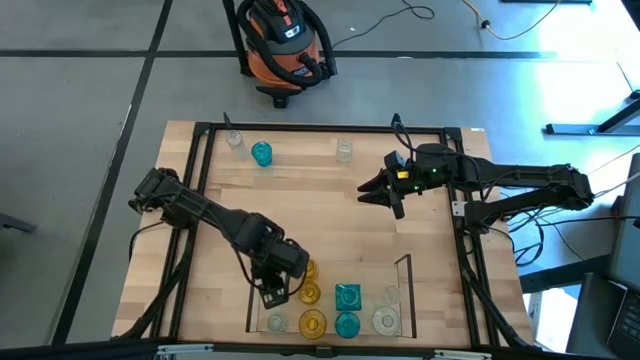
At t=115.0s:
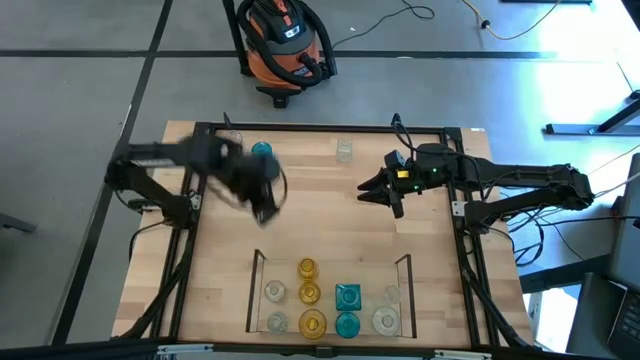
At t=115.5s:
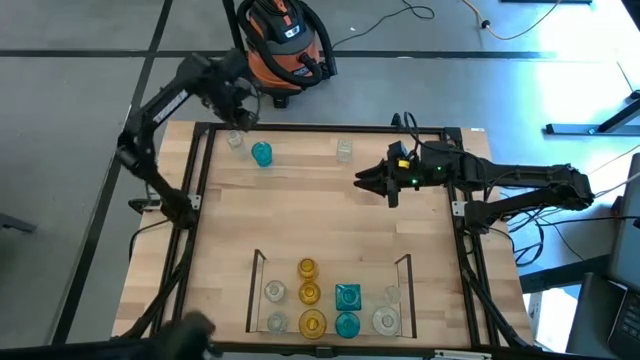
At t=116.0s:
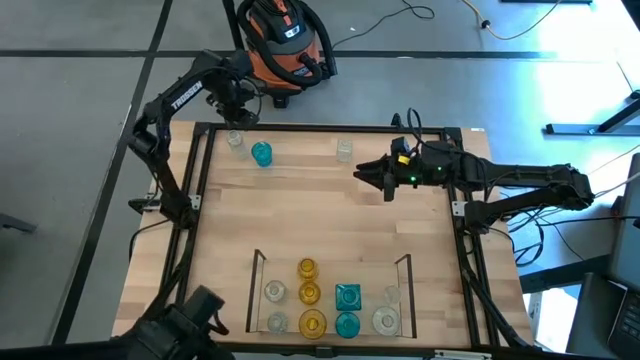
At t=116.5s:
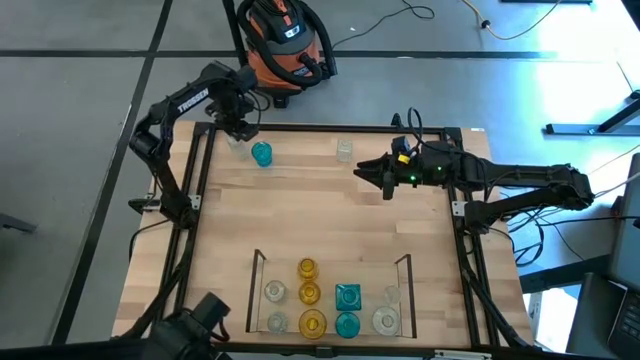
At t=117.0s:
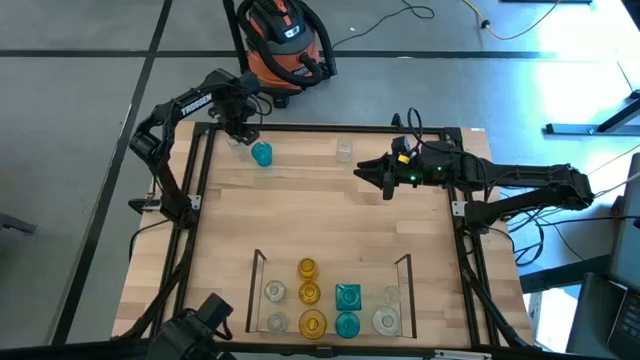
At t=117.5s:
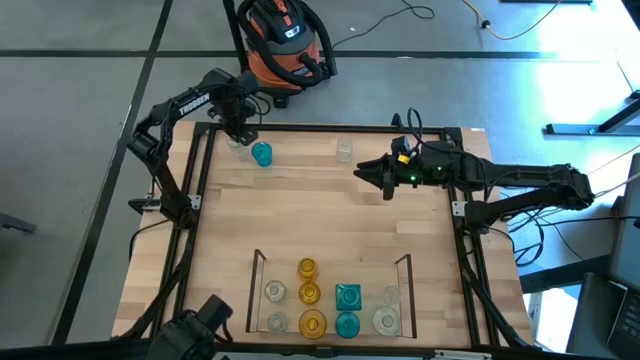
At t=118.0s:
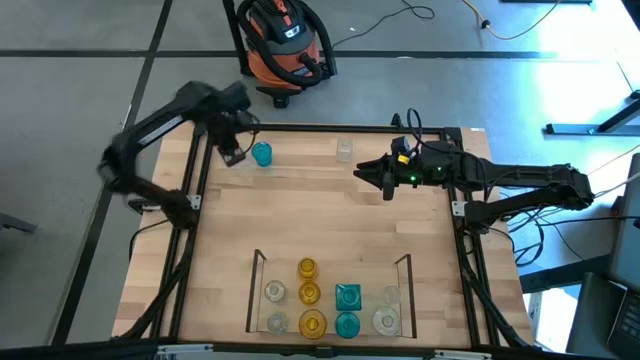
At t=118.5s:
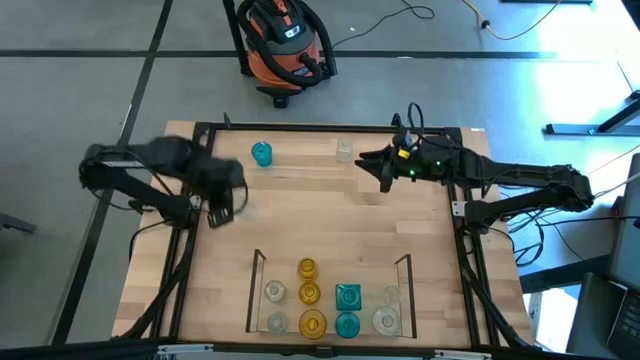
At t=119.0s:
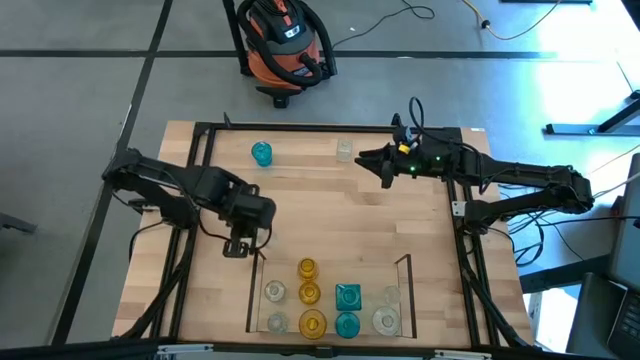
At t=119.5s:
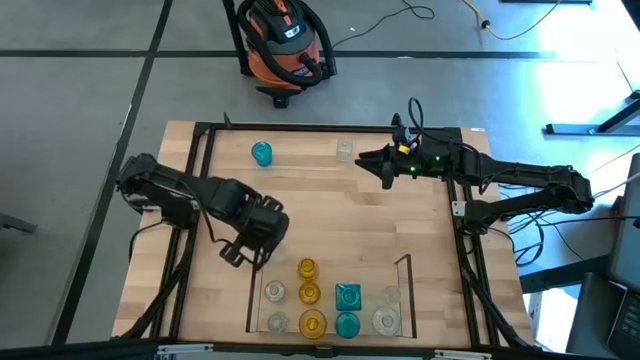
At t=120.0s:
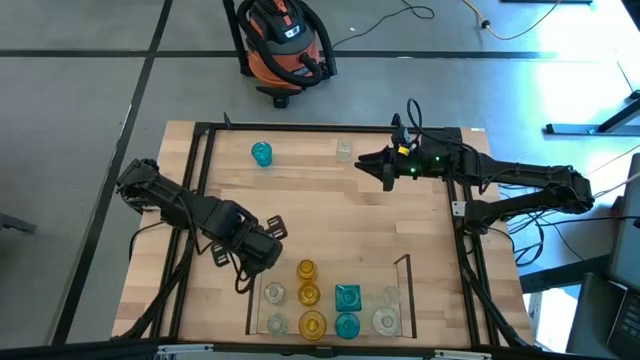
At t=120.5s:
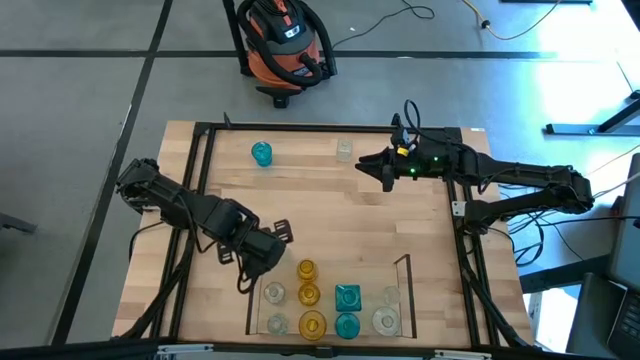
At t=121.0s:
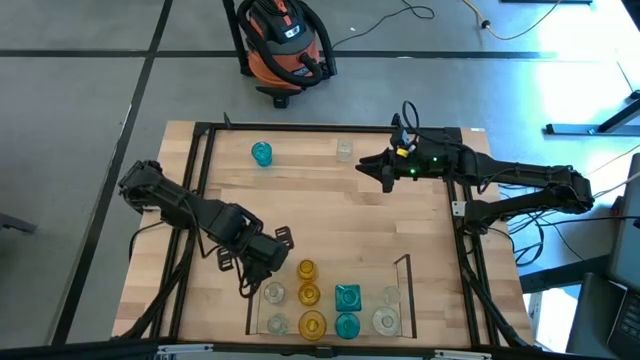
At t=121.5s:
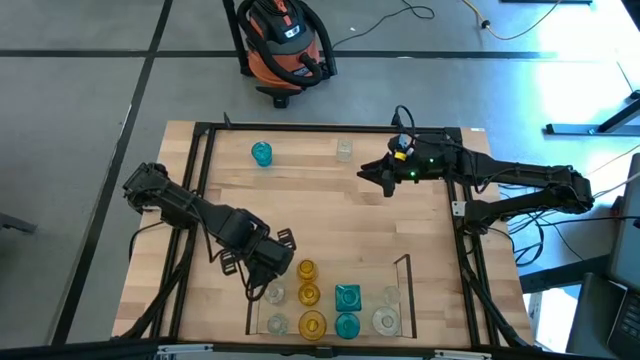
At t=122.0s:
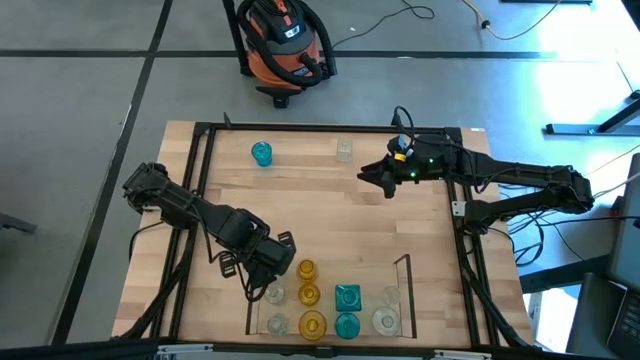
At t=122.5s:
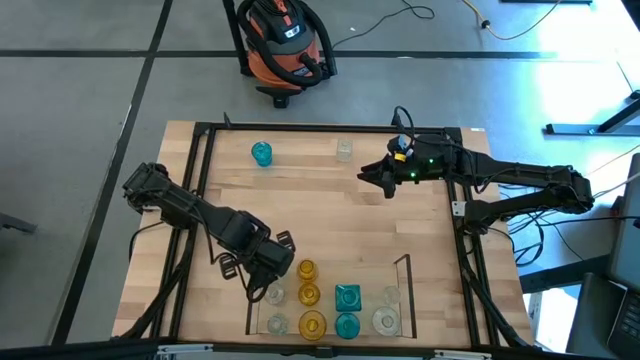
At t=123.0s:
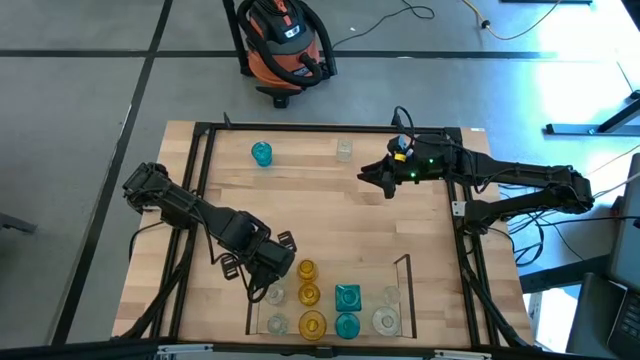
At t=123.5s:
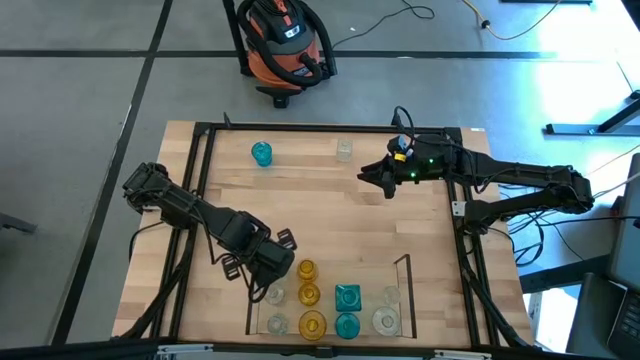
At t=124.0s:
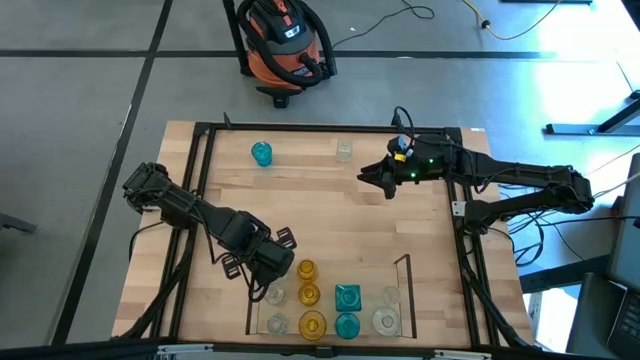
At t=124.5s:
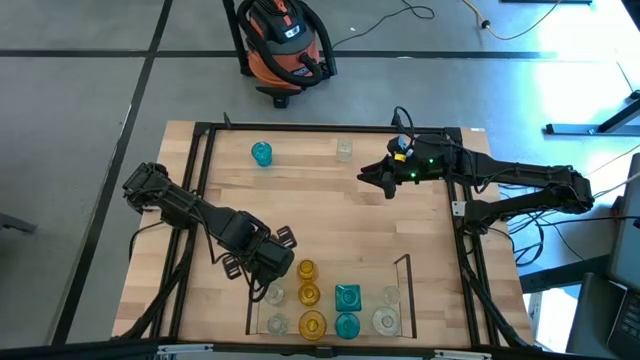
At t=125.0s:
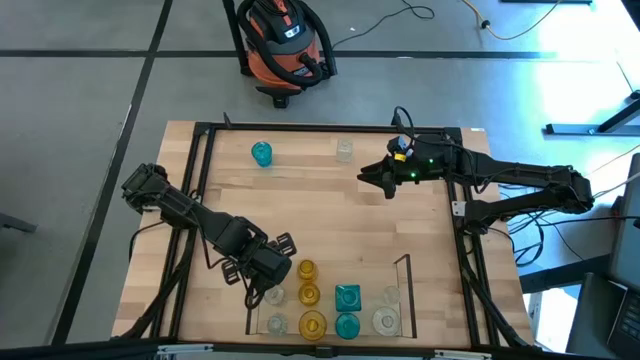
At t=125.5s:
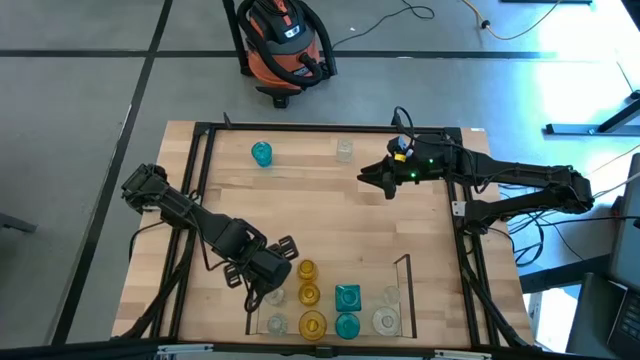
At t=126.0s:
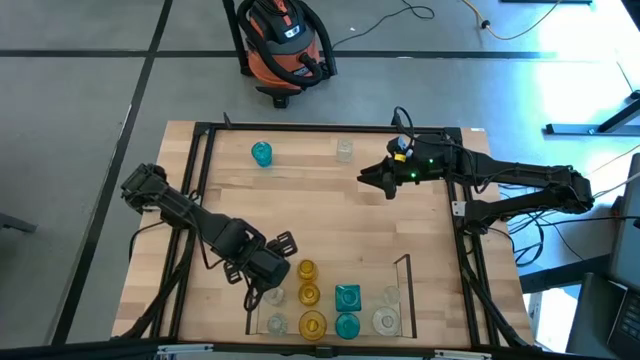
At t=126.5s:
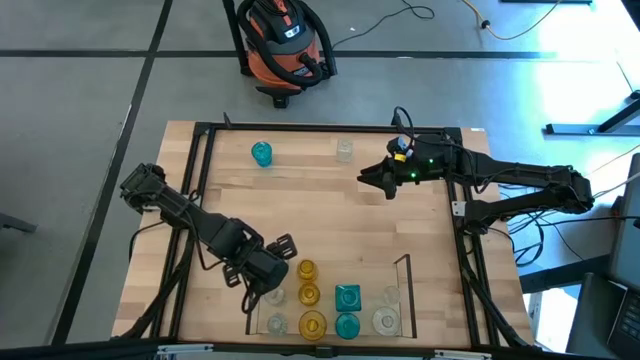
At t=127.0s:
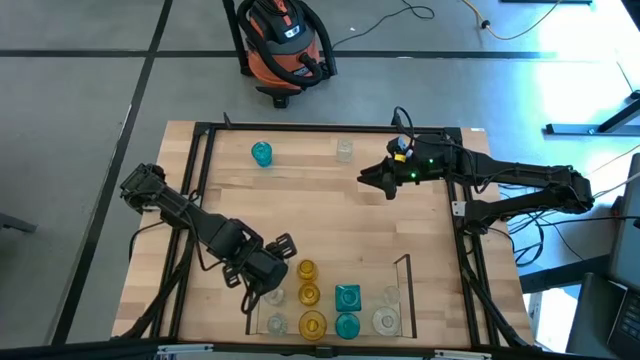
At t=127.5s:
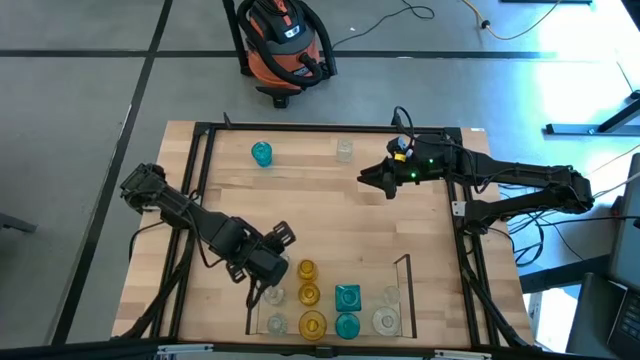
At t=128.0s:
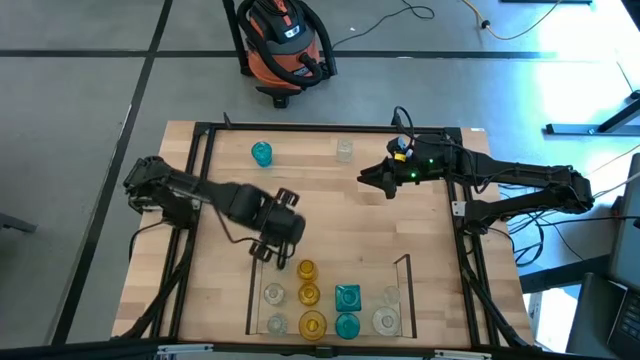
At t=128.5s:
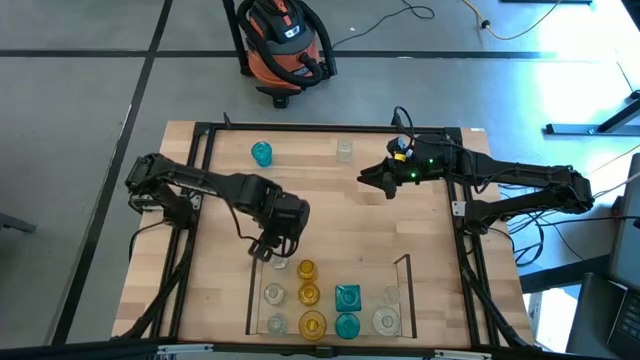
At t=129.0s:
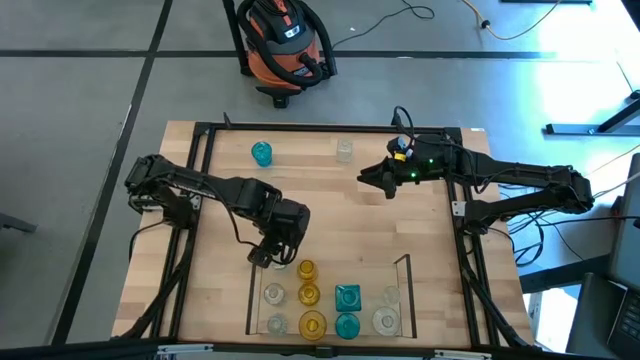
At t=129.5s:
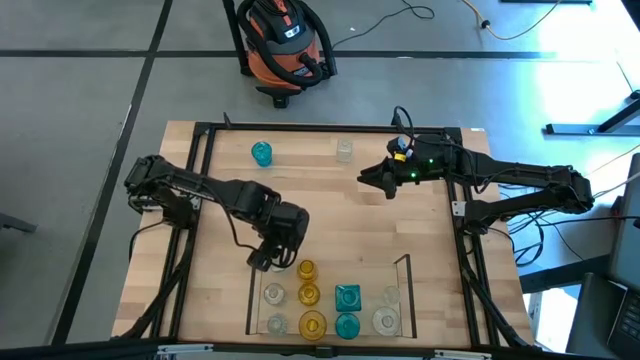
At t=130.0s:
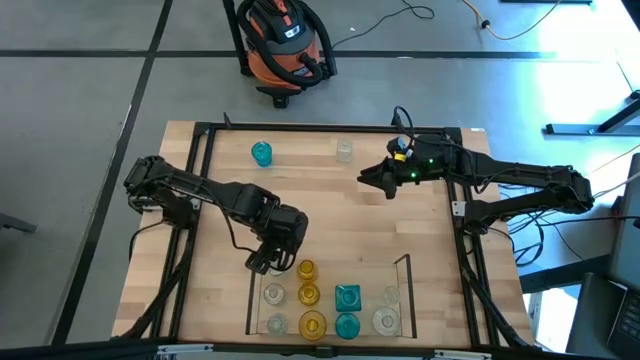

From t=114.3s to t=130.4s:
Task: sort vases onto shelf
Put the transparent vase on the shelf aligned with the other transparent vase

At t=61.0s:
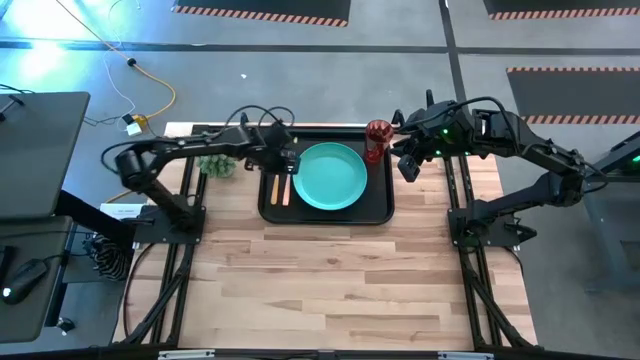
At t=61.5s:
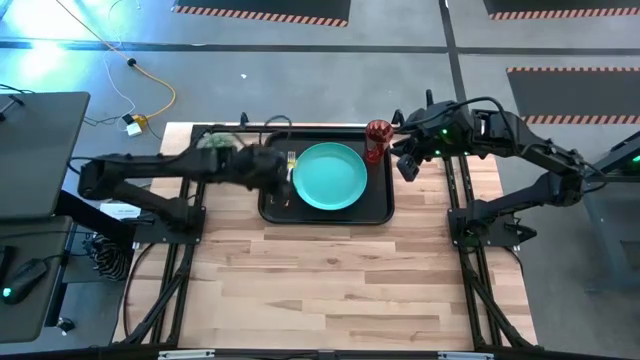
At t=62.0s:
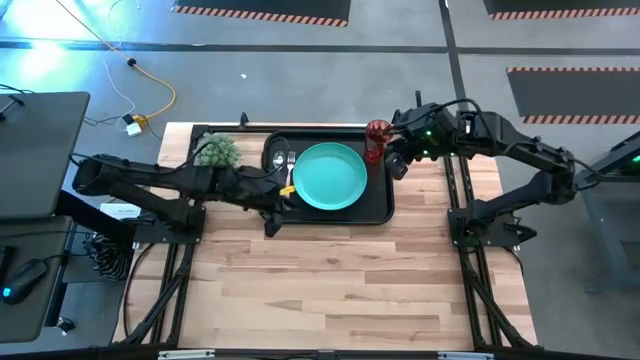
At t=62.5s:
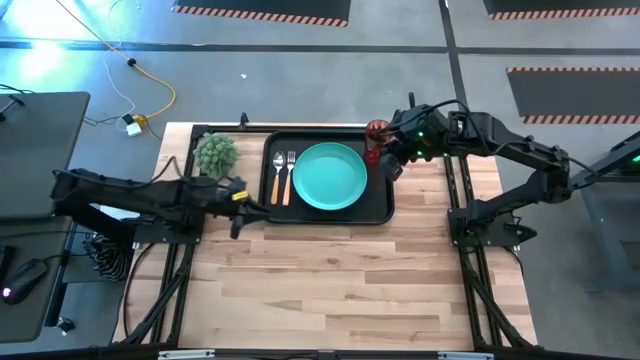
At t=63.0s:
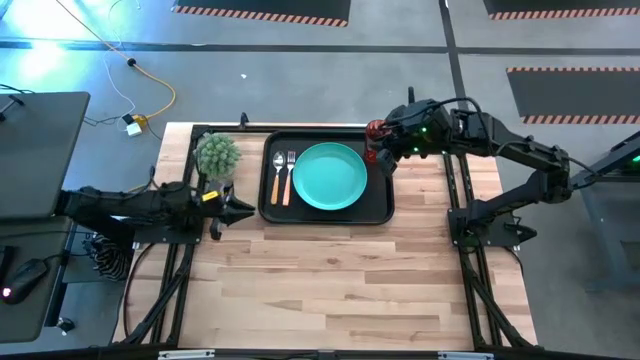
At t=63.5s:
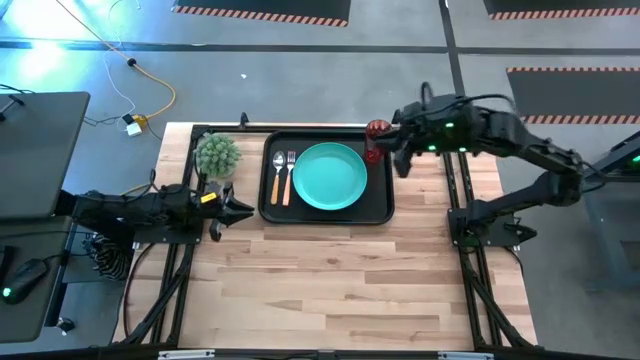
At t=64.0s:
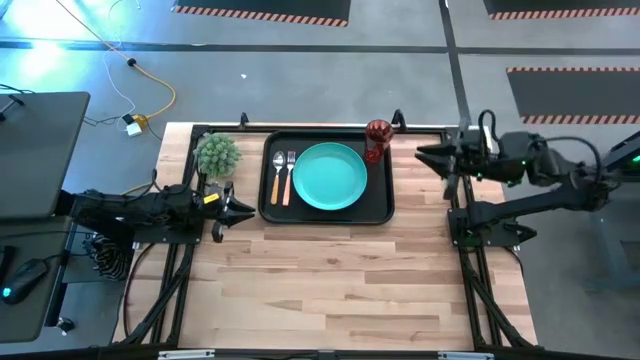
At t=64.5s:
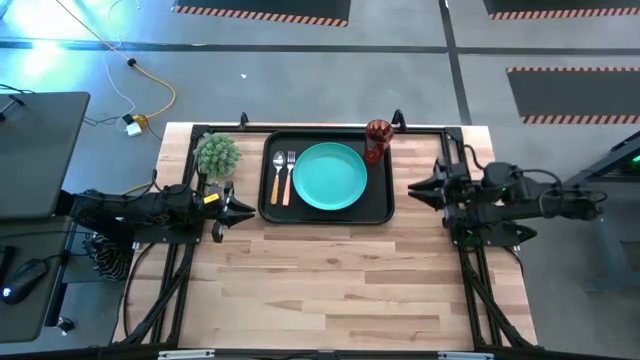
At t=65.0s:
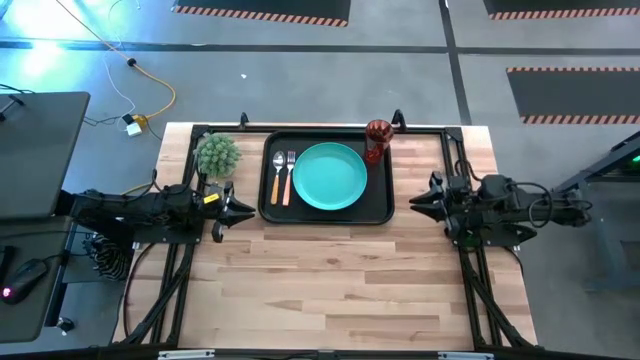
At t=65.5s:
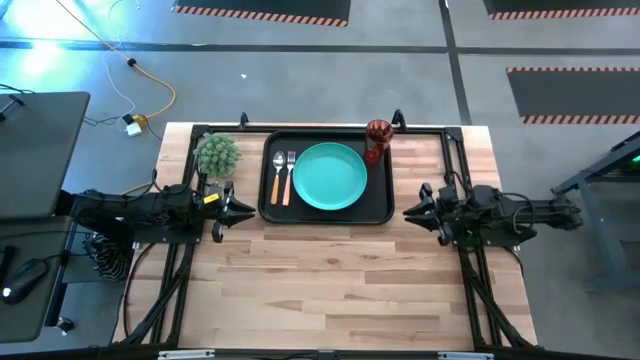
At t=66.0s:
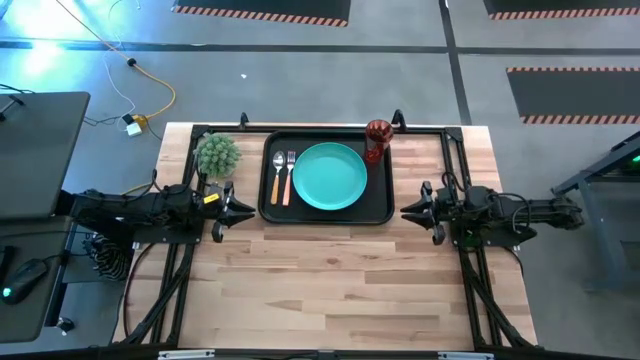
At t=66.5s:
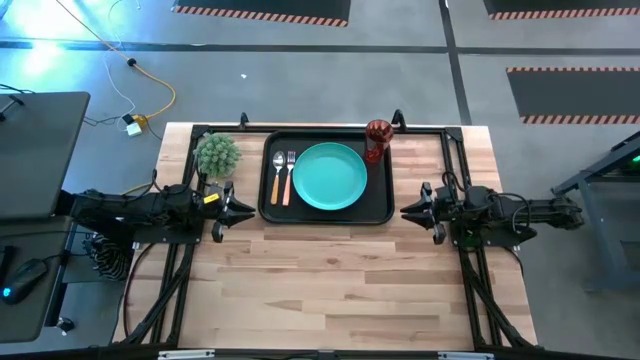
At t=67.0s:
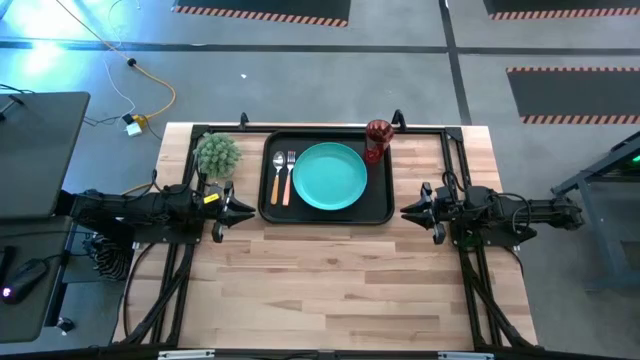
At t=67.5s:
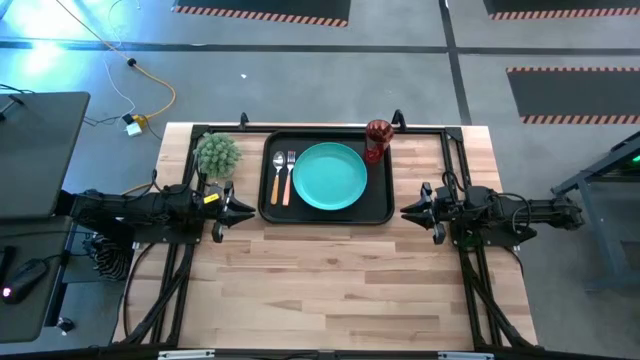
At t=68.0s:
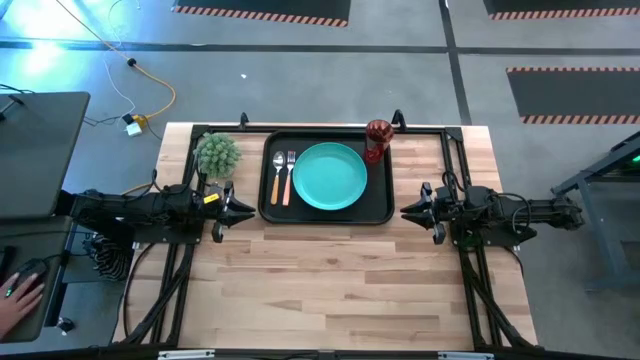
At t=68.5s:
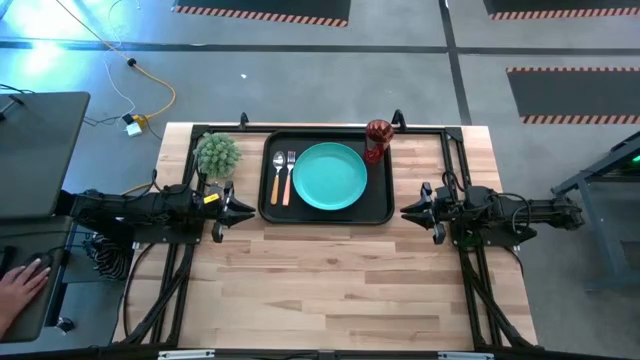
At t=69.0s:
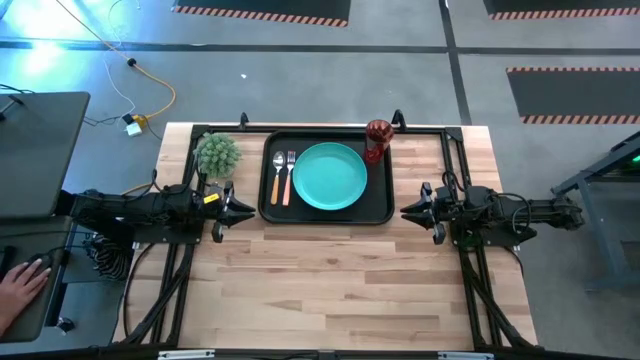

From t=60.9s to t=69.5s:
Task: Pick and place plate/cup/fork/spoon on tray
Return to Home Position
